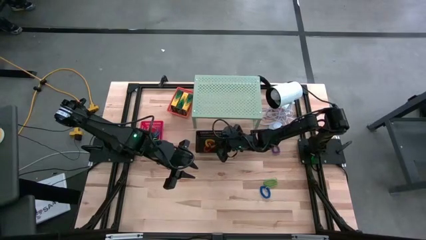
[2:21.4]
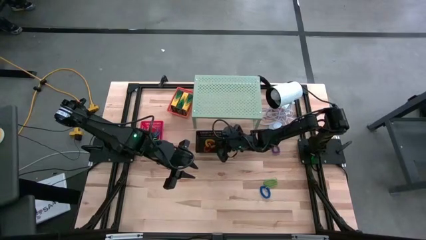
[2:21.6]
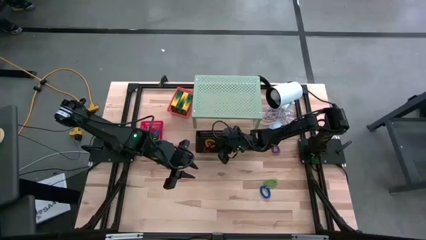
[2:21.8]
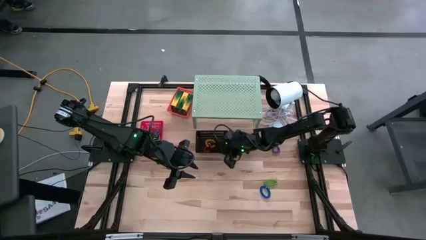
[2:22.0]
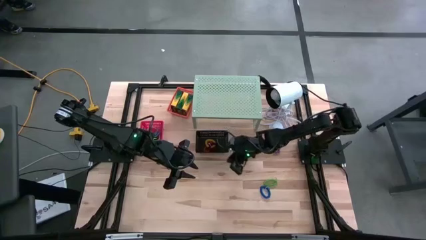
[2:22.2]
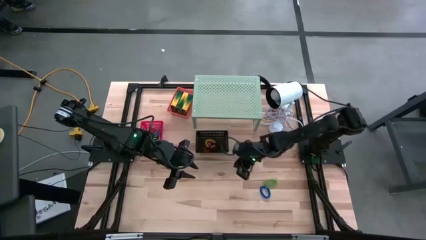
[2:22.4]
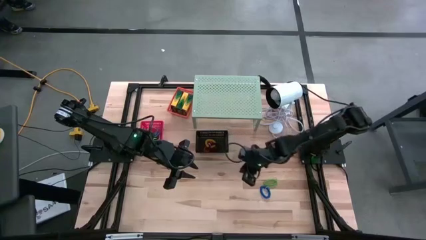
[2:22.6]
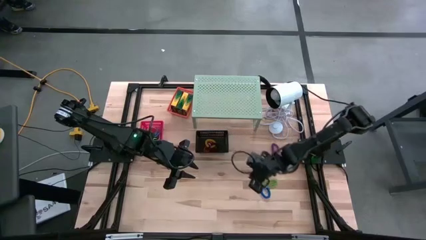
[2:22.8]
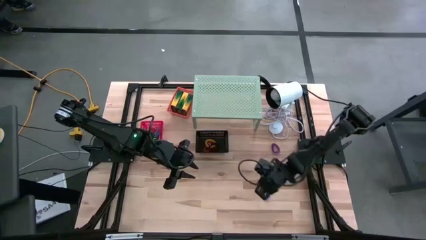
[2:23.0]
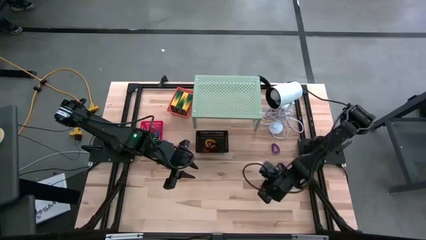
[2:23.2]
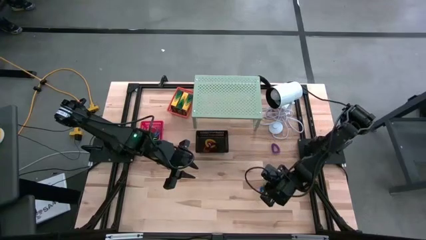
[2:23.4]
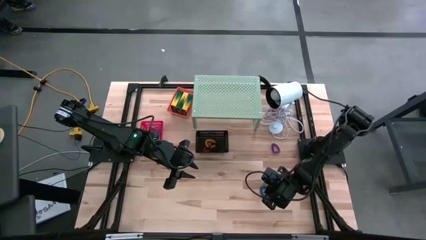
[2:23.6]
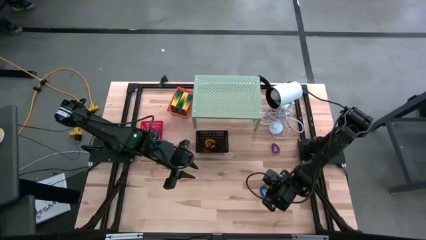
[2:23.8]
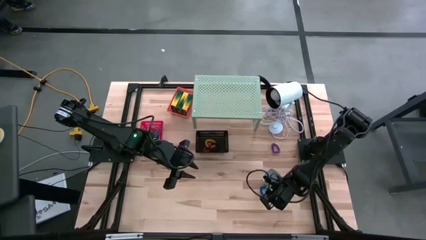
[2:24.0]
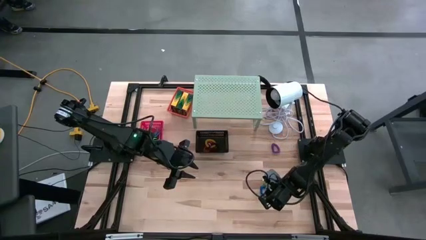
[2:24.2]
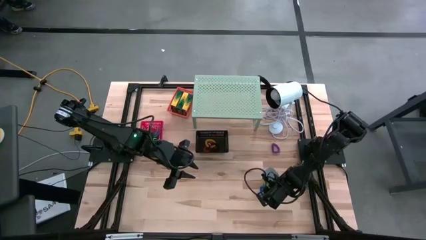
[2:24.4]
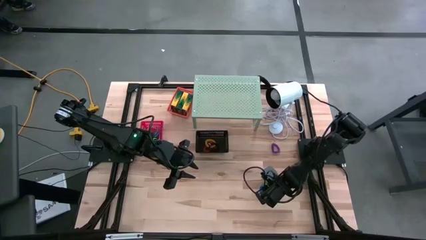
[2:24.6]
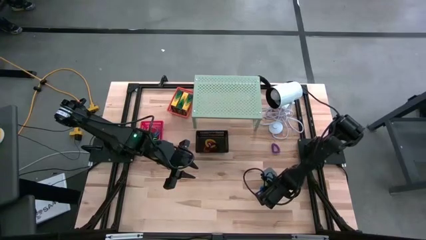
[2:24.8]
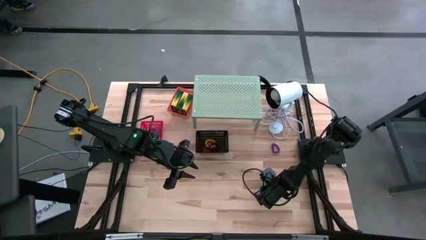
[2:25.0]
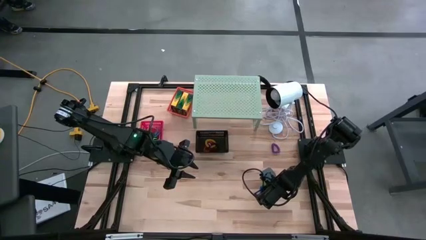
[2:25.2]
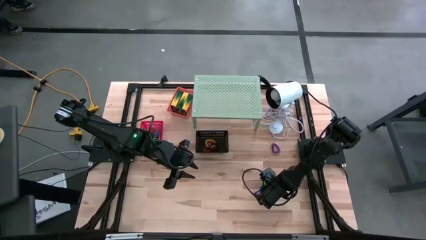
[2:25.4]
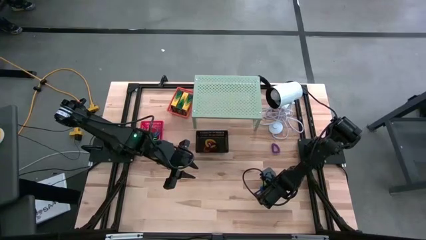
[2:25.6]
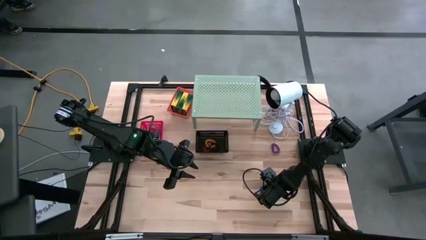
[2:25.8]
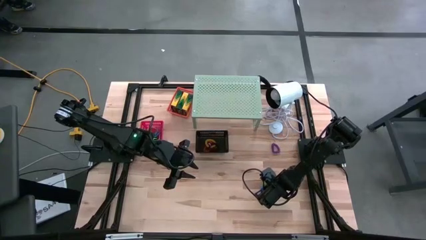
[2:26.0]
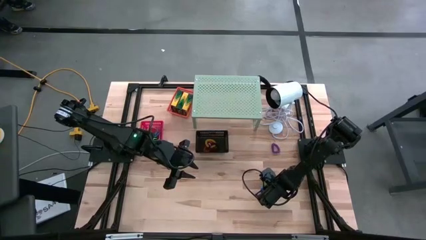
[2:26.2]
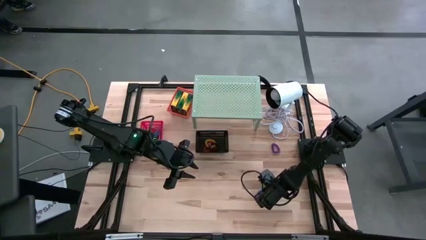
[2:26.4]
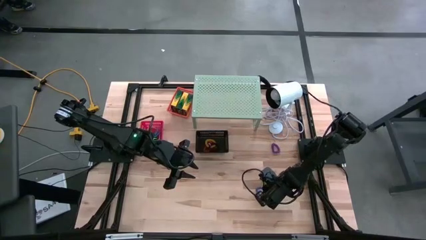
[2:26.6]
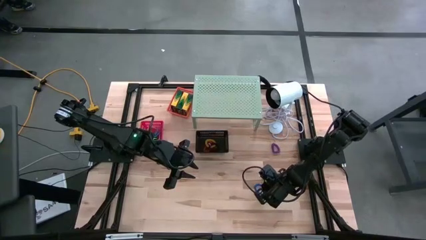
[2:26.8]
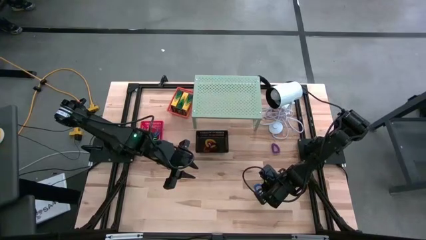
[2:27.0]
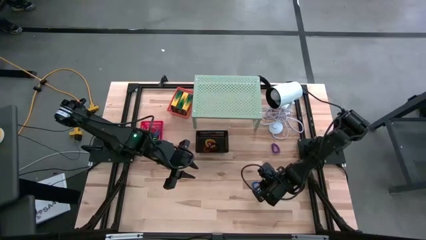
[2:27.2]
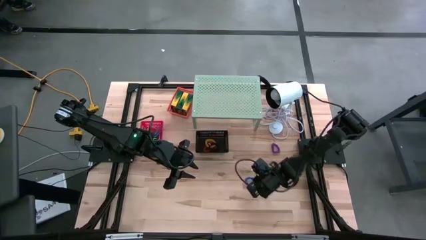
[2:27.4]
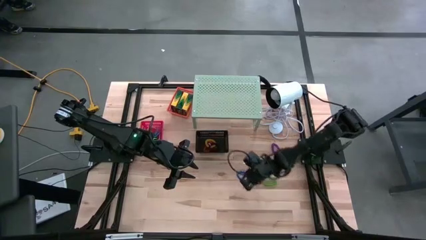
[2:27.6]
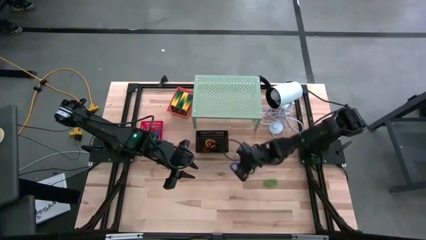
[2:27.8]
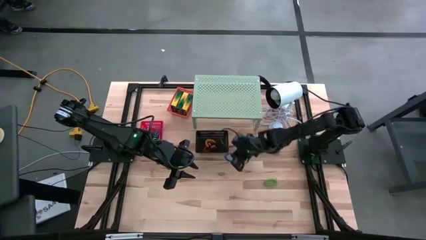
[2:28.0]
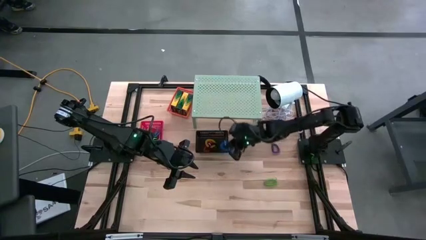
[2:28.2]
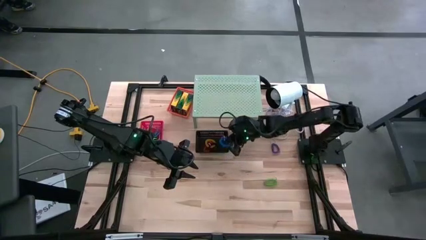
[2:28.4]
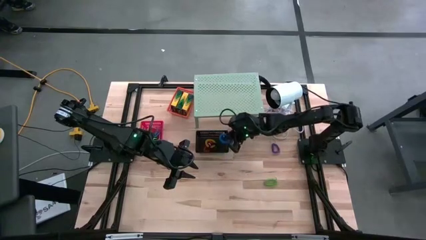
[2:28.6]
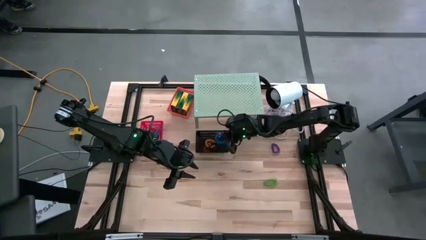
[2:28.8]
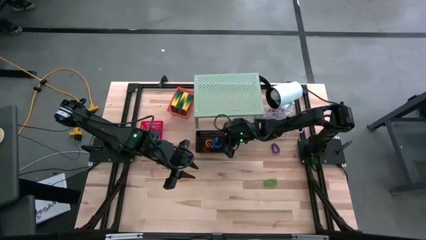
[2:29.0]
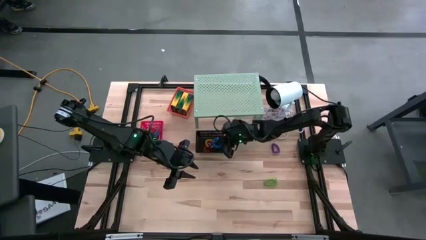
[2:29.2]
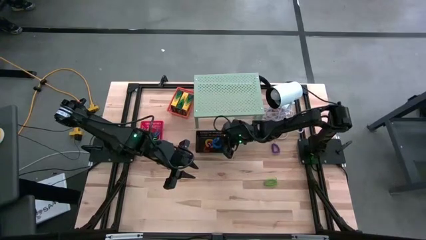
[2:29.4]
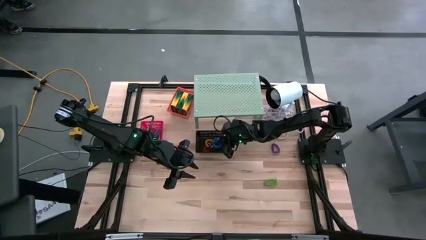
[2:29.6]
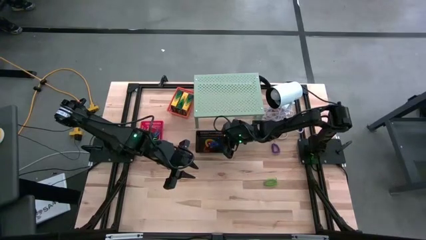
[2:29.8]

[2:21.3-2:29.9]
Task: Pick & Place Office Desk Supplies
Put the blue spring rubber band into the black bin on the shelf

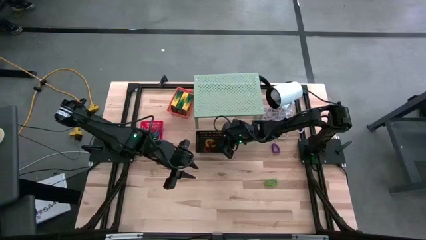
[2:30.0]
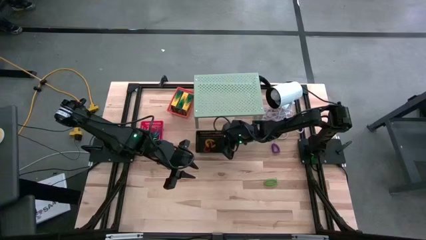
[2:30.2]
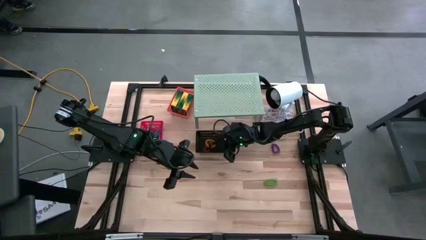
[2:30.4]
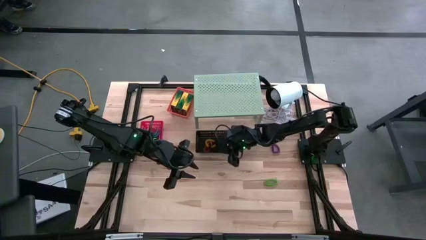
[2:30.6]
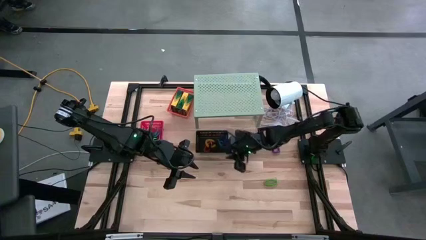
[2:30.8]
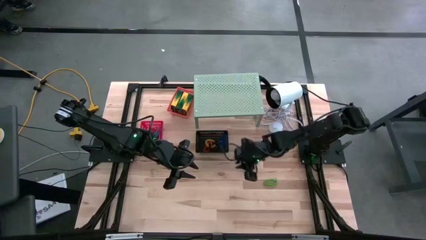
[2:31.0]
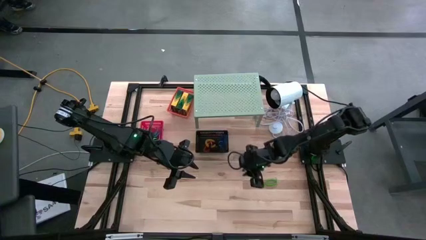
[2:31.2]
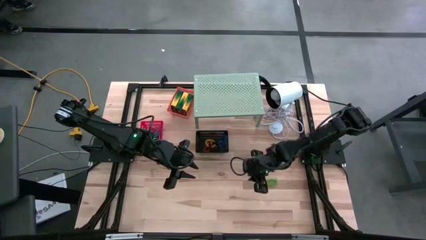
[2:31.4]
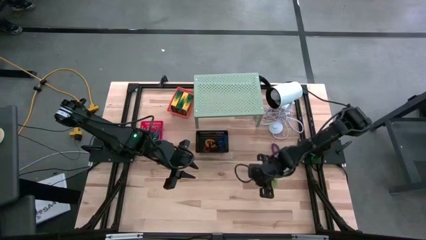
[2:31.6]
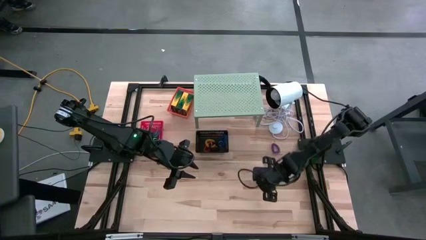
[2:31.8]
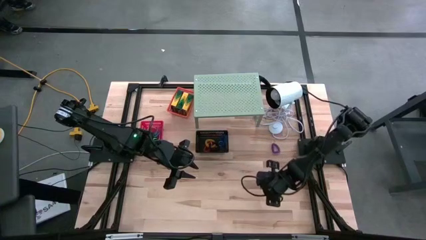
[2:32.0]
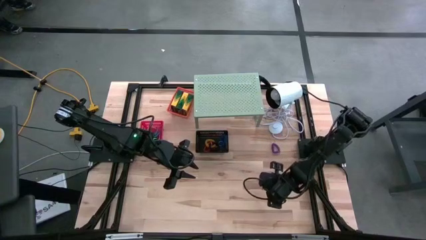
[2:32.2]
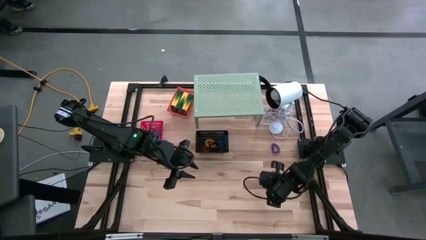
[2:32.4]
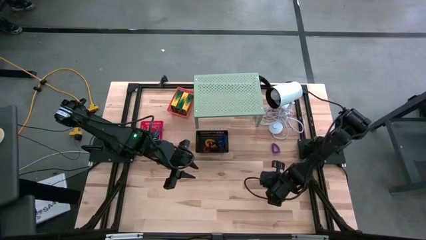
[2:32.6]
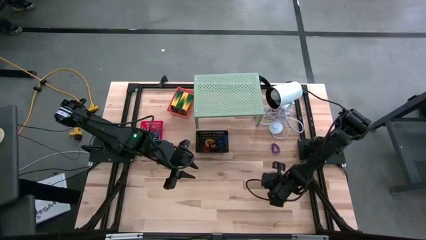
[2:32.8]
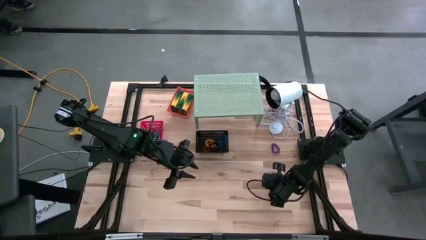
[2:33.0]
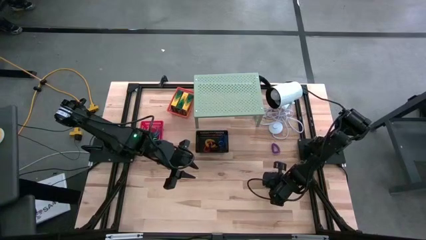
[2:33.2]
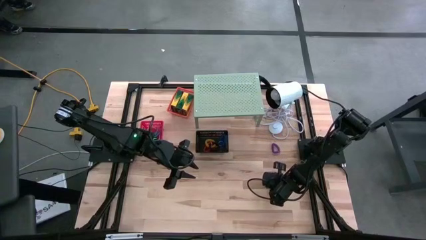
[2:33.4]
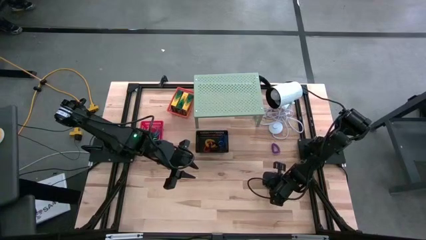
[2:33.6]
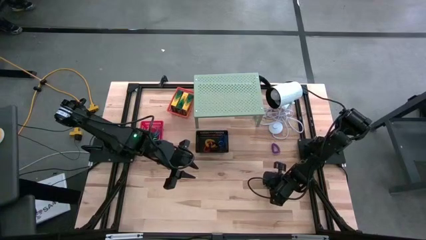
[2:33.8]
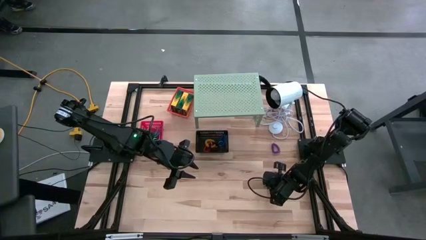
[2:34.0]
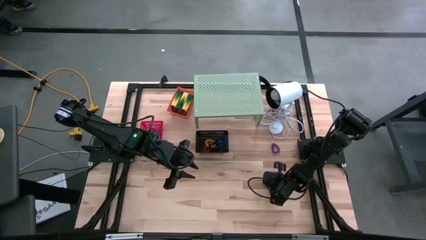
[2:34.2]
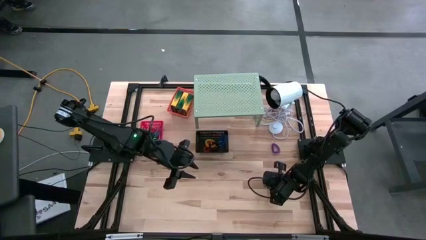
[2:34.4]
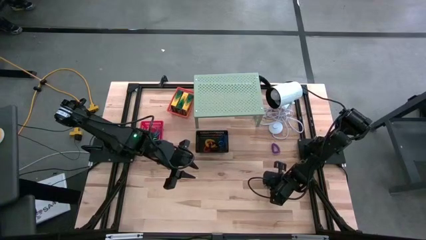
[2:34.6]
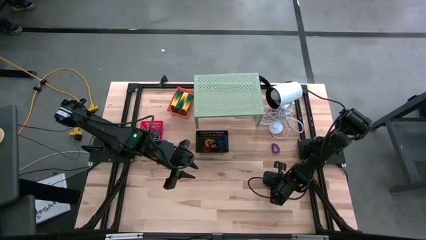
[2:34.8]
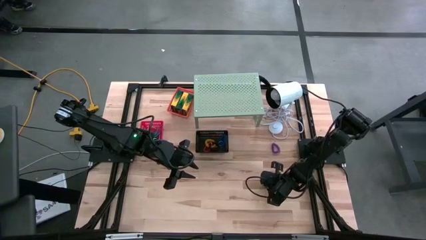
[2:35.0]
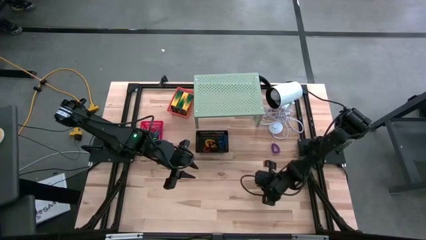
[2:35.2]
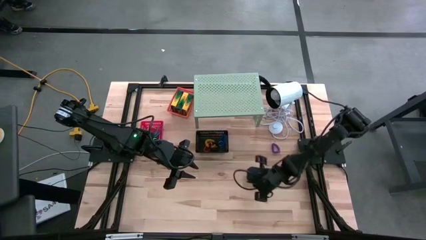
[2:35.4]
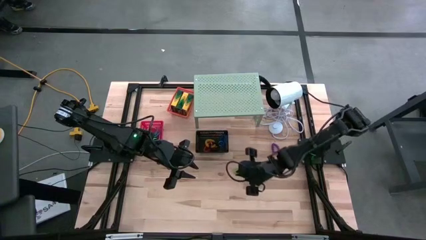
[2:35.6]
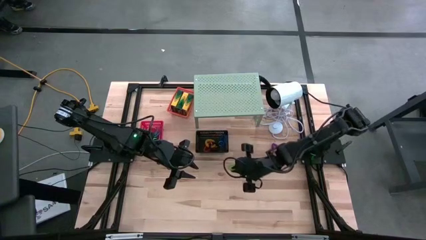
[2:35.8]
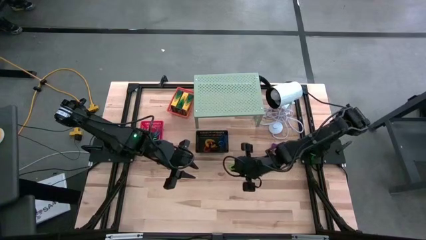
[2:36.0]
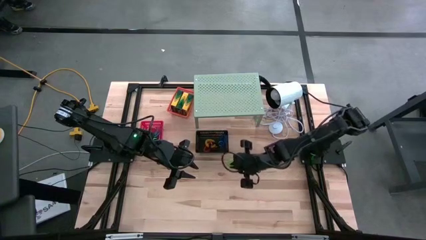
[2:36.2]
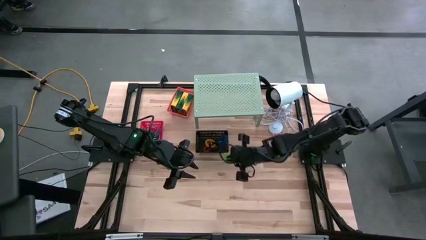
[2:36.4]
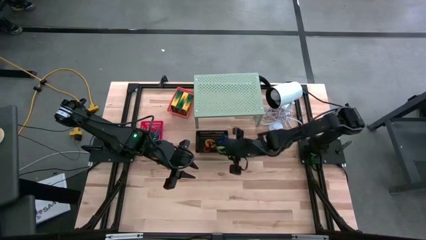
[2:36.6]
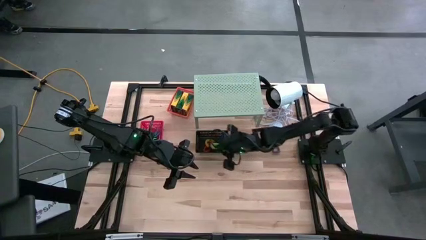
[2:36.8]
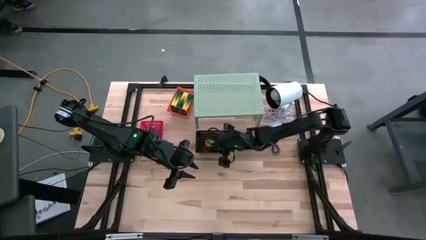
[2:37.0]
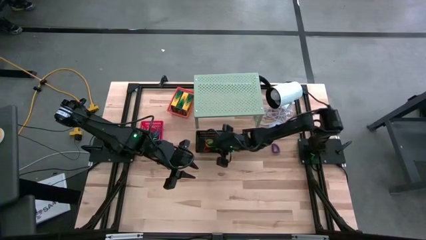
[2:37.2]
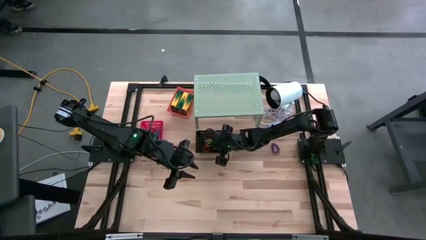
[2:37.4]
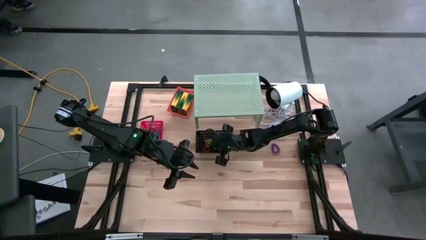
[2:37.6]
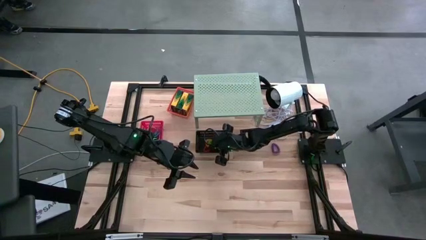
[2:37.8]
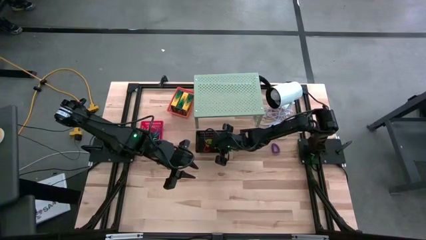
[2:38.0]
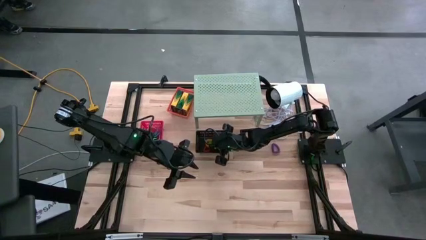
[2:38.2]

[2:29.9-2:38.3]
Put the green spring rubber band into the black bin on the shelf
